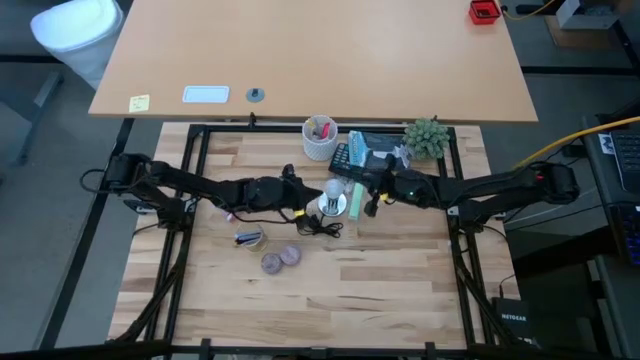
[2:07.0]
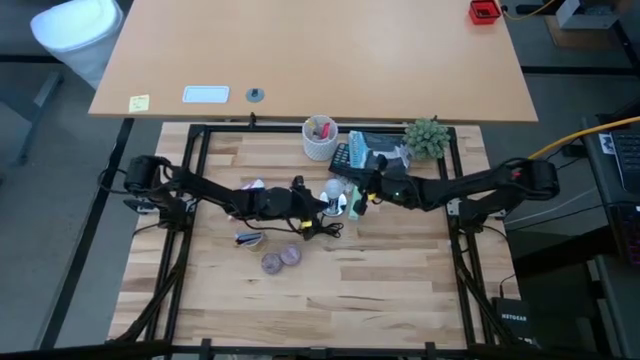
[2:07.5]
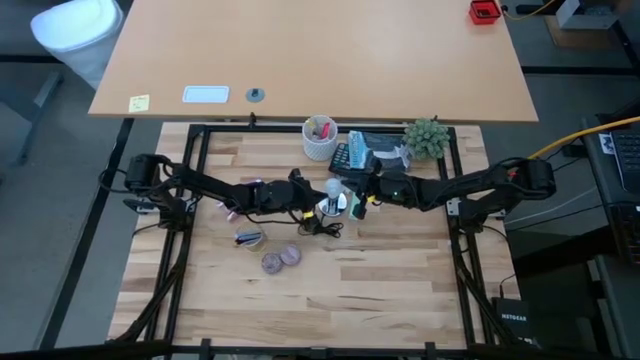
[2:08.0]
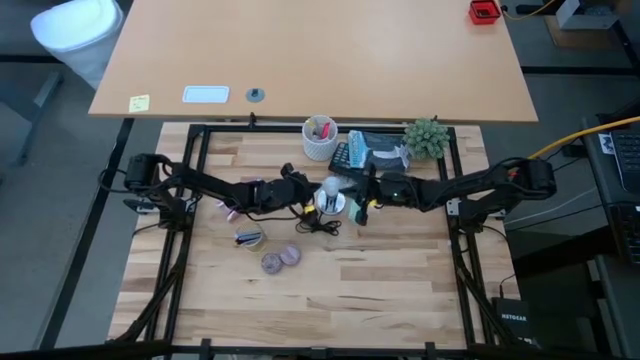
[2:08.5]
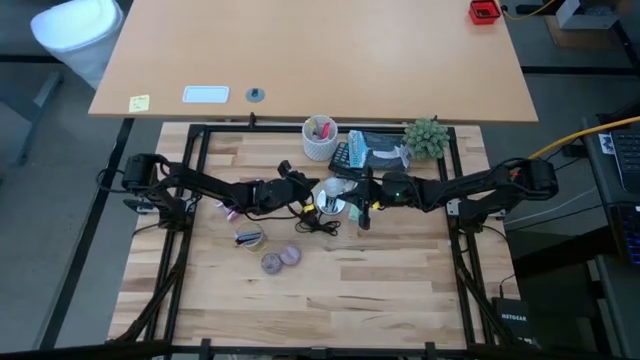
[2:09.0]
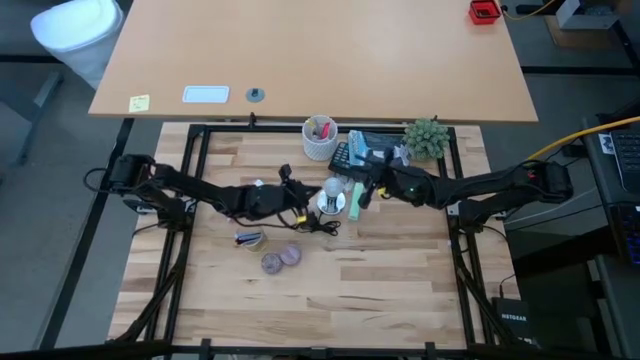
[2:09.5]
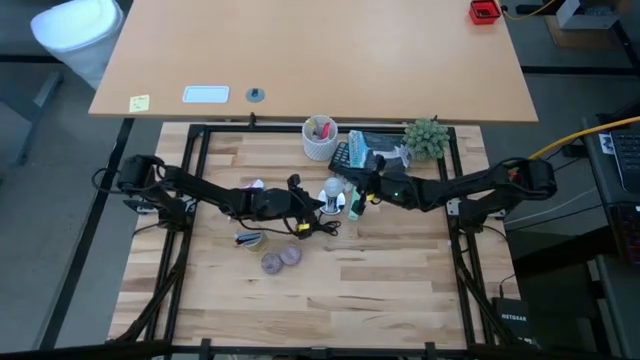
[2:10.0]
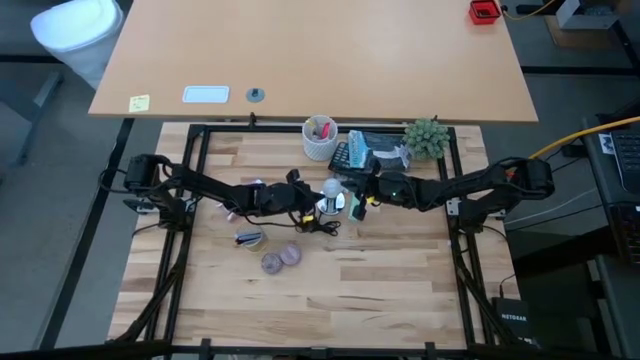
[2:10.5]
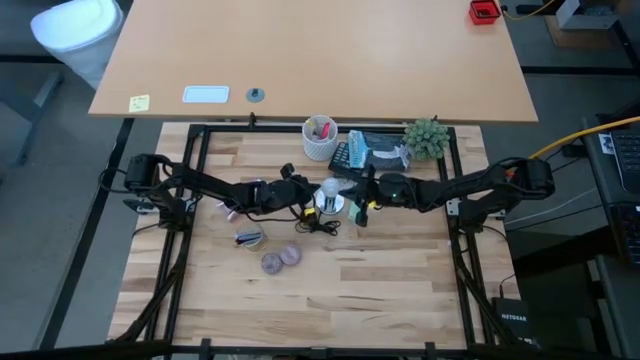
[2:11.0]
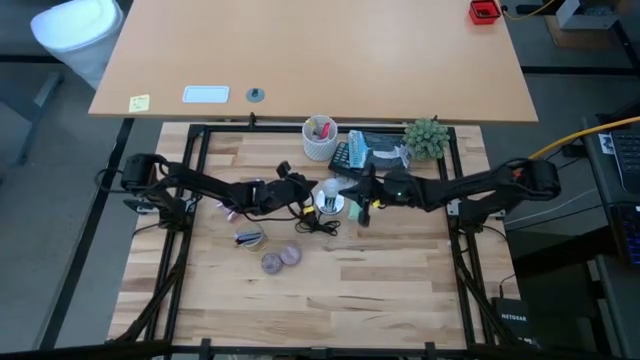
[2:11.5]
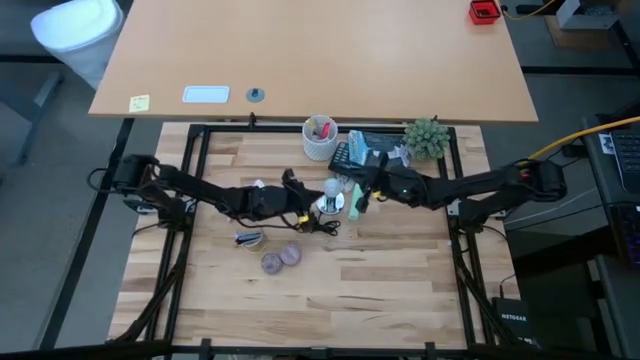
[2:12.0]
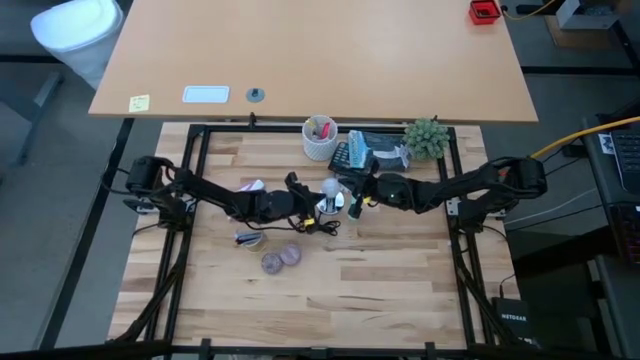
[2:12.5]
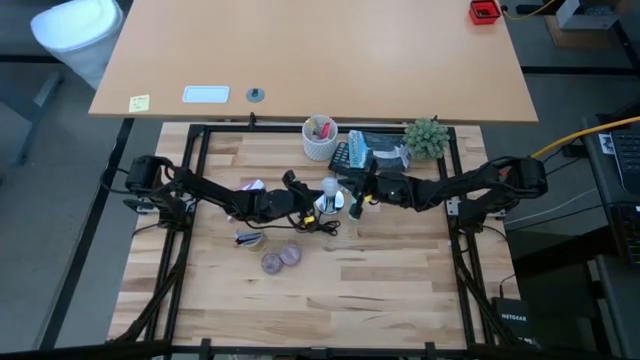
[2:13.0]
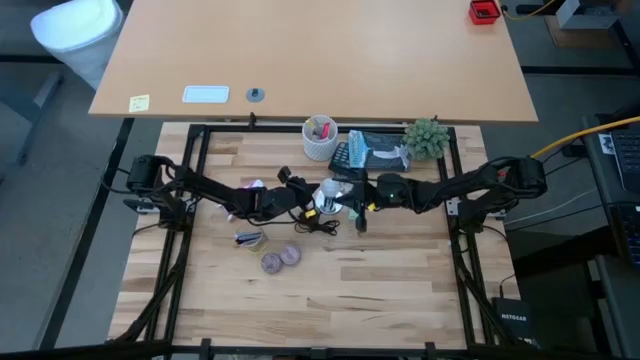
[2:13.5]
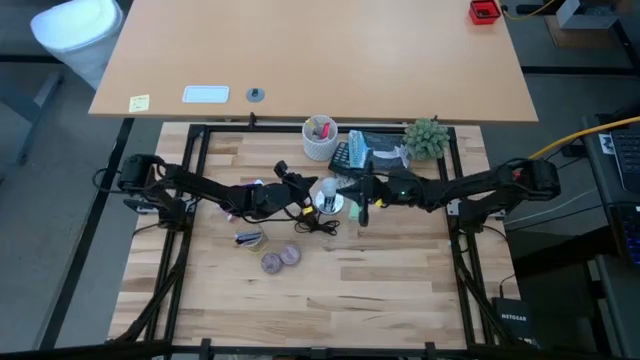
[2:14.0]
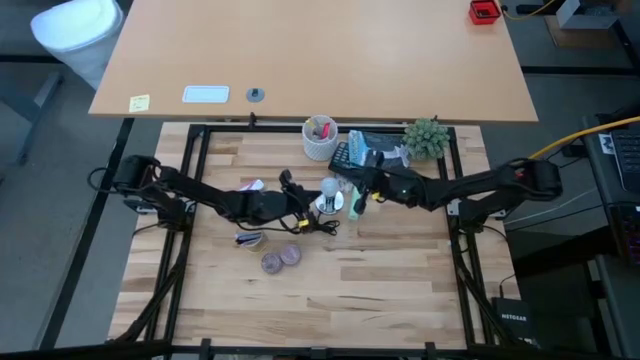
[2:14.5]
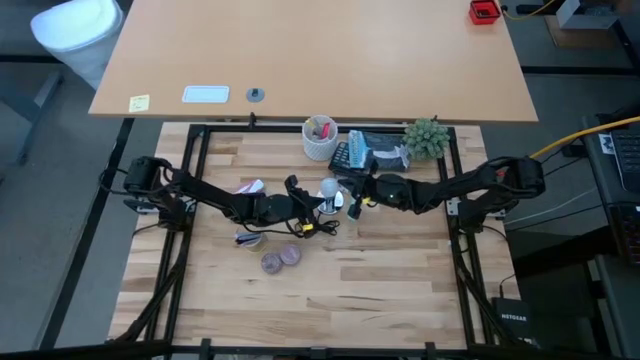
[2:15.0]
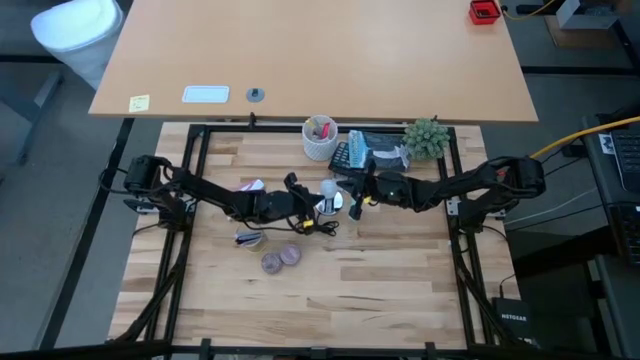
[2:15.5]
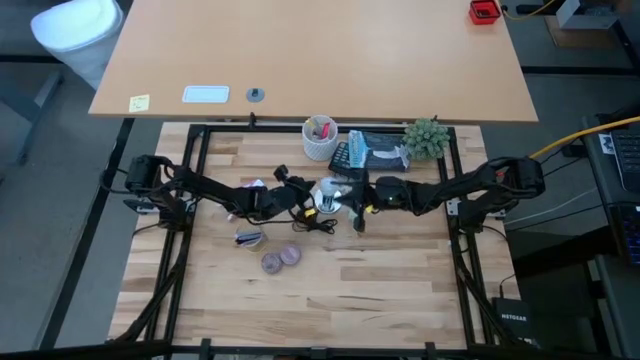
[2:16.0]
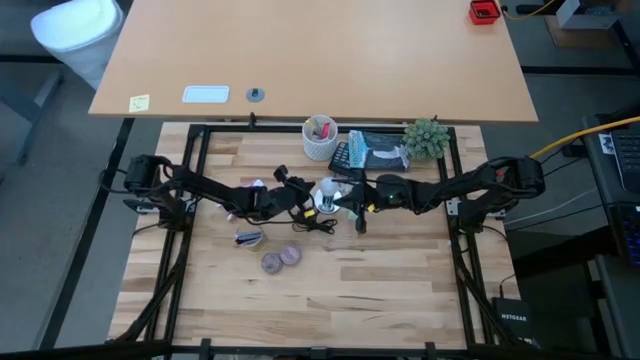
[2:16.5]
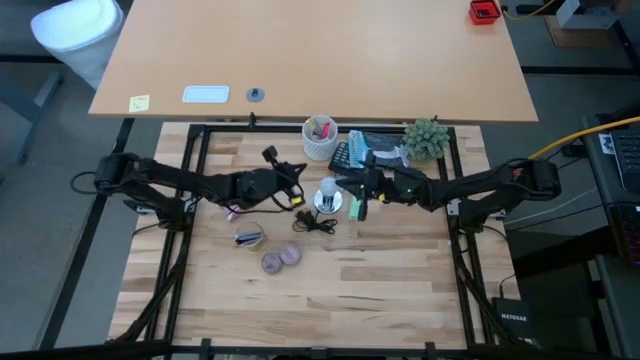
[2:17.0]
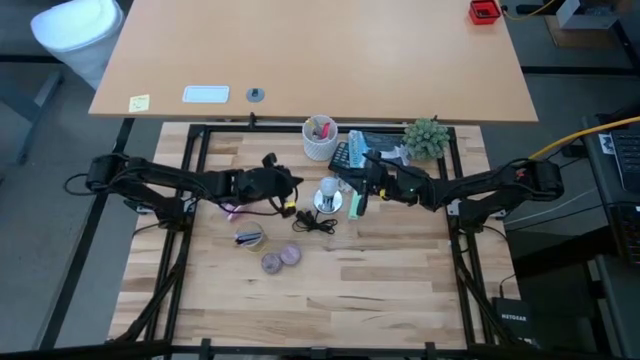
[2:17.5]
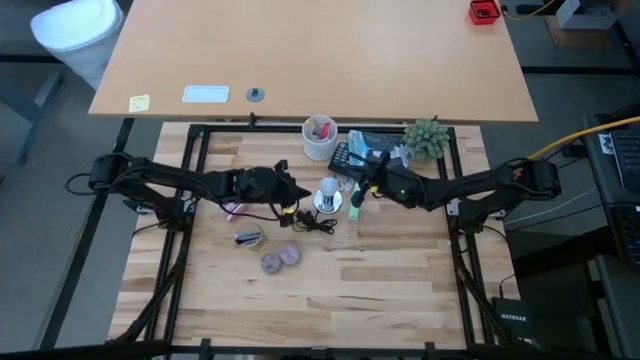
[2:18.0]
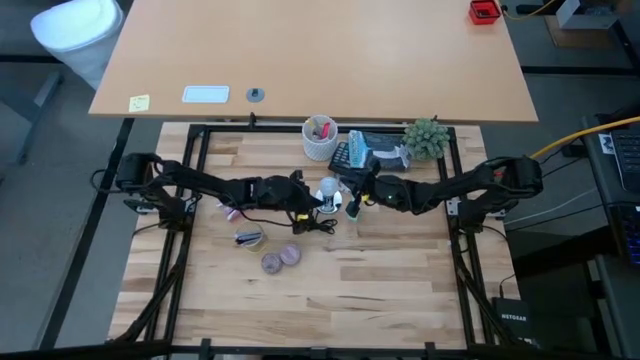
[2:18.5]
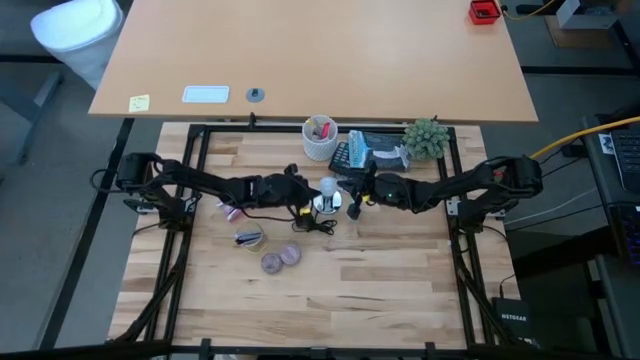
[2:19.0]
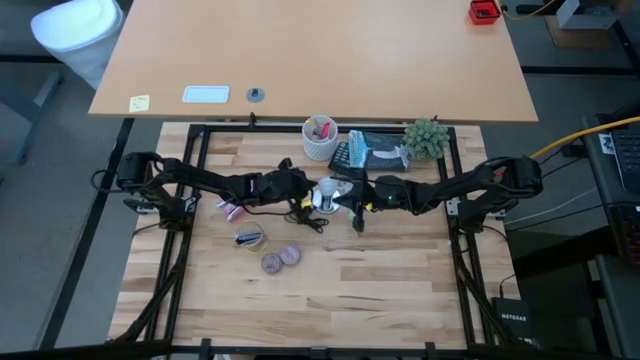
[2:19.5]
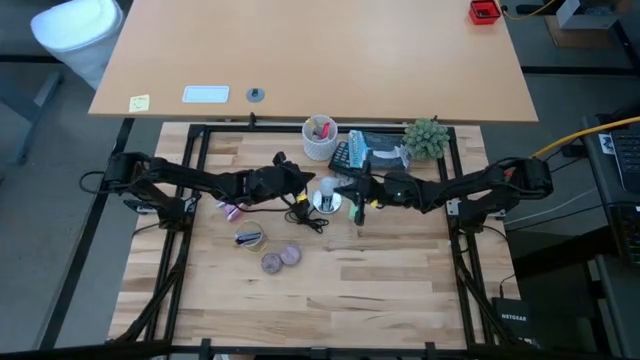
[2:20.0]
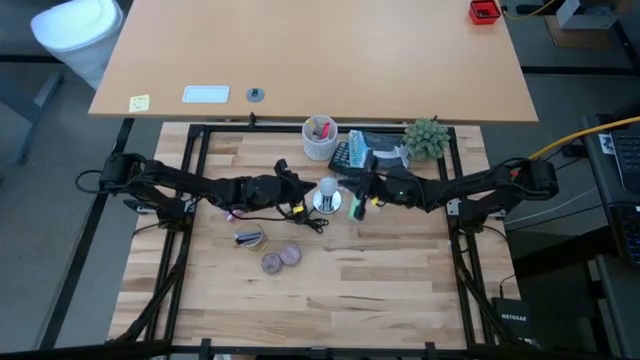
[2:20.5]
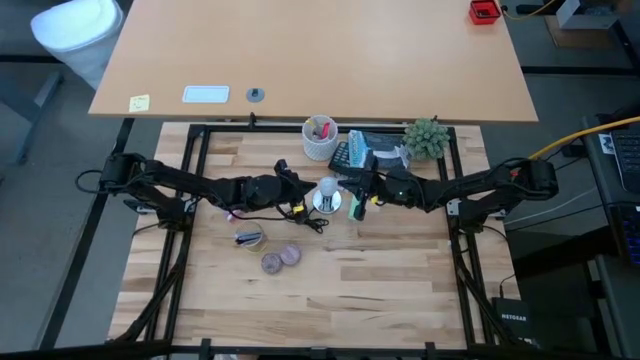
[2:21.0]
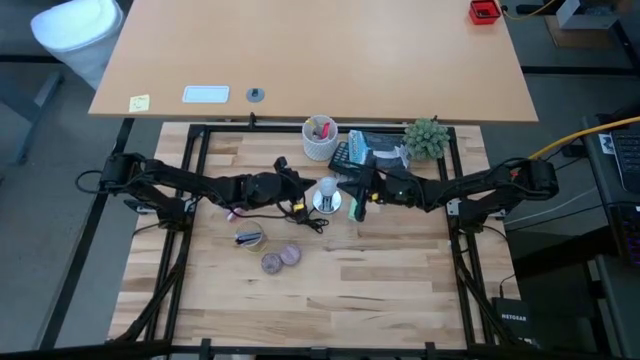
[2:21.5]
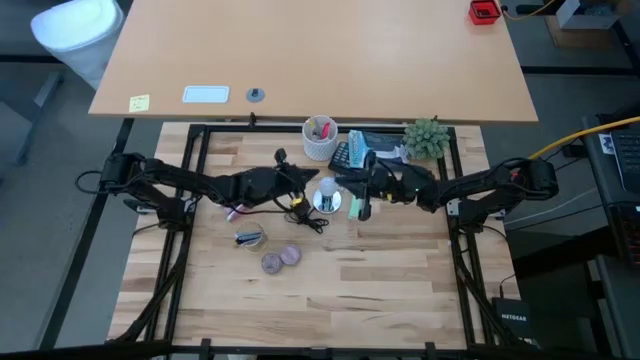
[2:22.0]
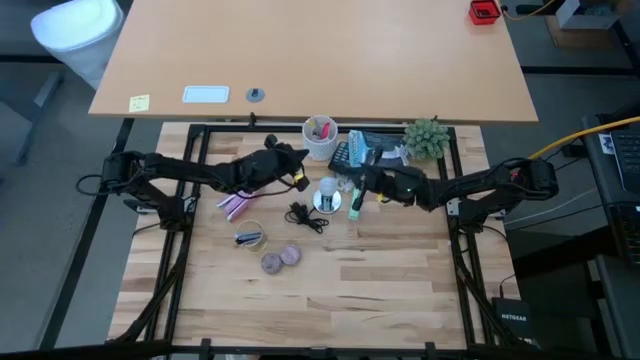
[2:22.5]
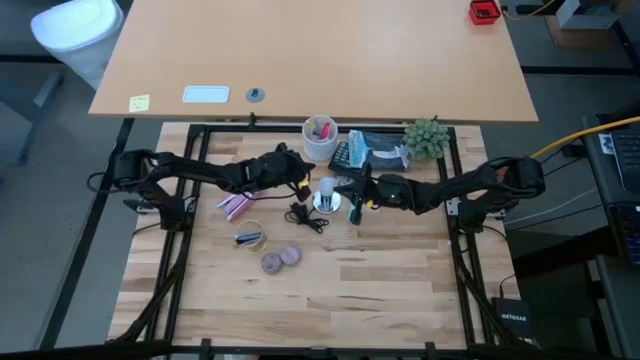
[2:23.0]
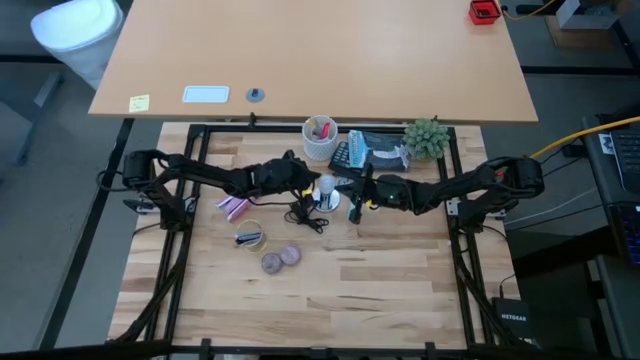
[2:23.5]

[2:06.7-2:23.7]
Task: Screw lightbulb
Insert the white lightbulb into the silver lamp
